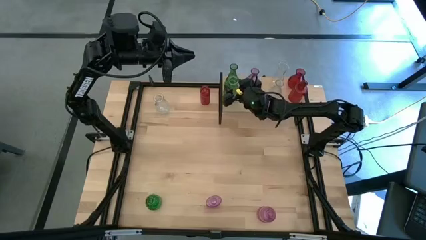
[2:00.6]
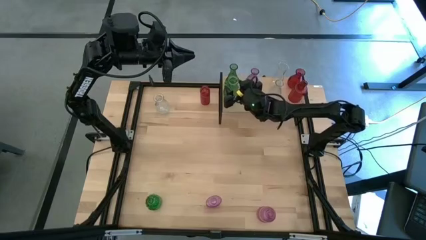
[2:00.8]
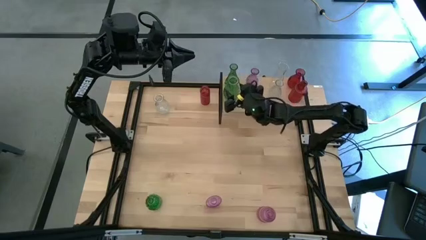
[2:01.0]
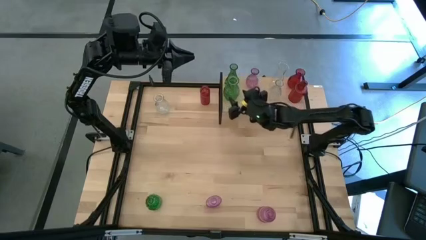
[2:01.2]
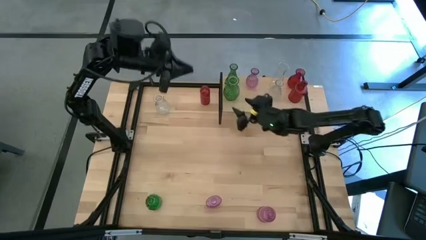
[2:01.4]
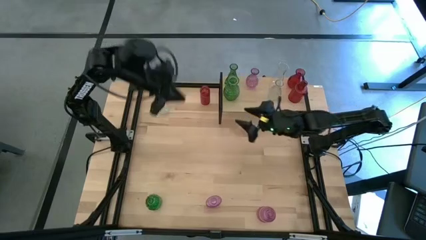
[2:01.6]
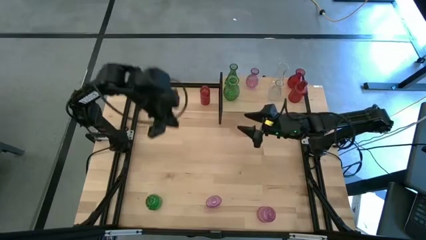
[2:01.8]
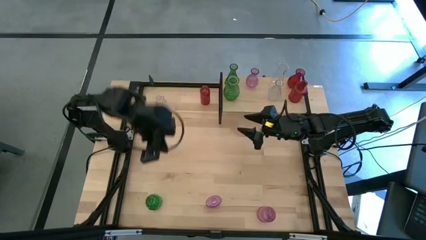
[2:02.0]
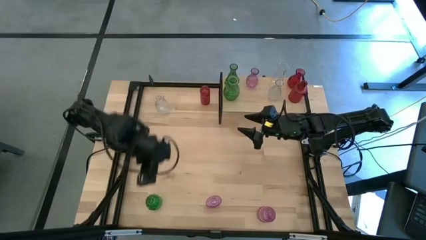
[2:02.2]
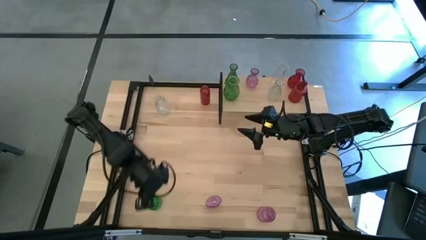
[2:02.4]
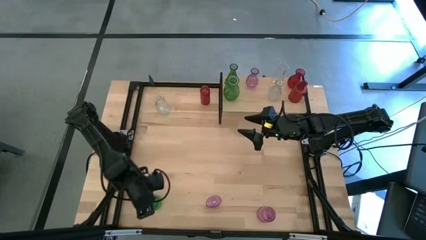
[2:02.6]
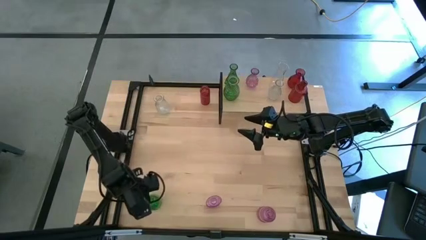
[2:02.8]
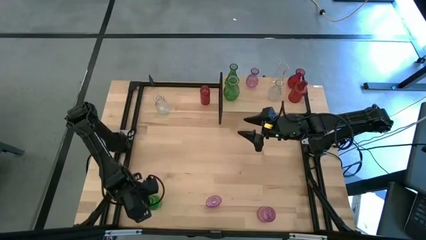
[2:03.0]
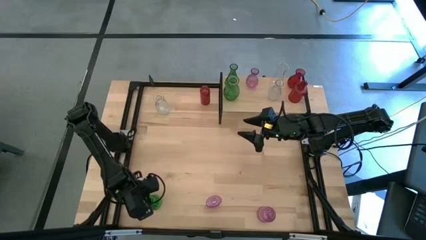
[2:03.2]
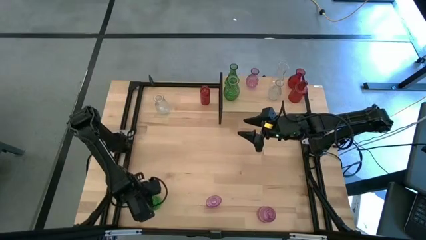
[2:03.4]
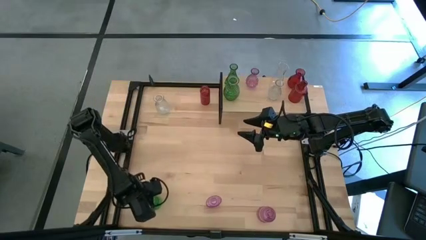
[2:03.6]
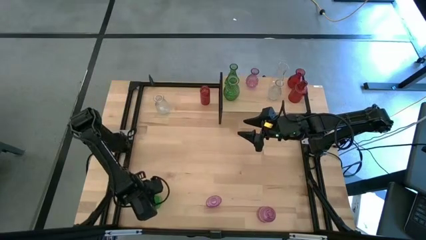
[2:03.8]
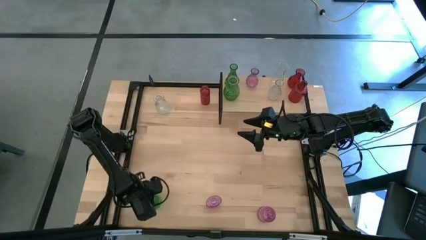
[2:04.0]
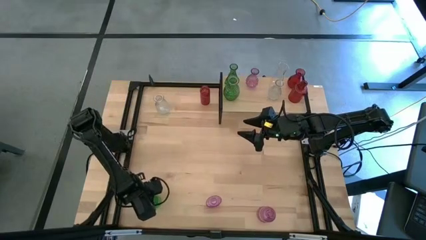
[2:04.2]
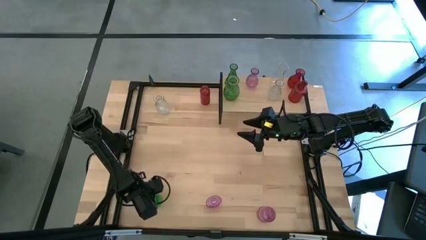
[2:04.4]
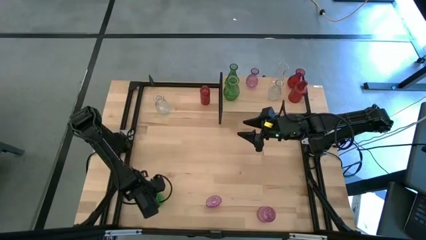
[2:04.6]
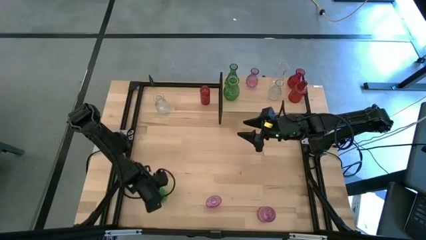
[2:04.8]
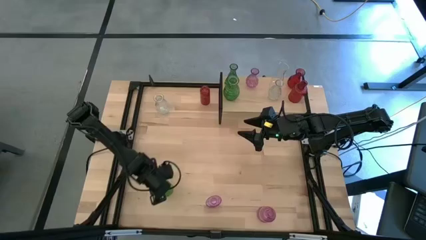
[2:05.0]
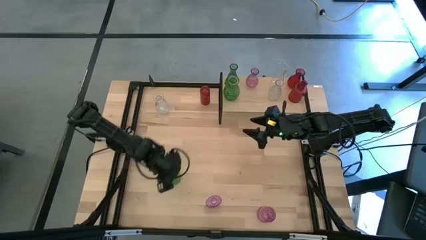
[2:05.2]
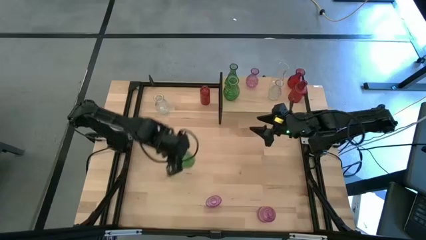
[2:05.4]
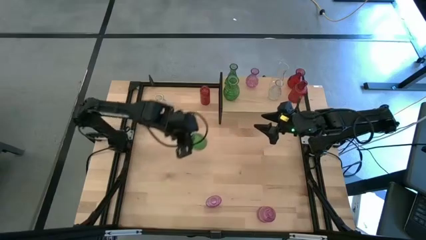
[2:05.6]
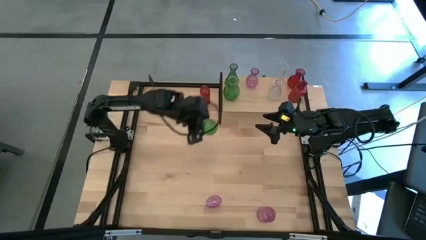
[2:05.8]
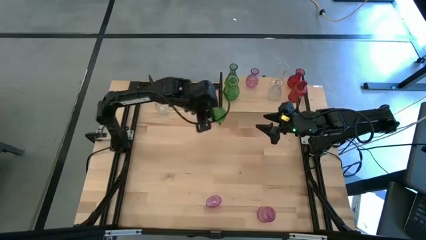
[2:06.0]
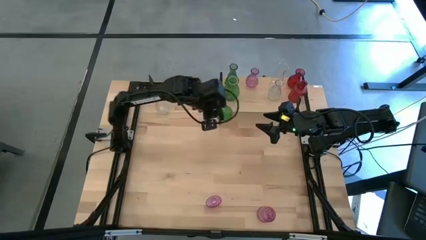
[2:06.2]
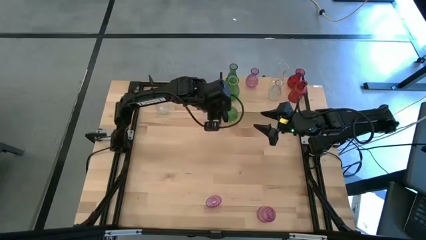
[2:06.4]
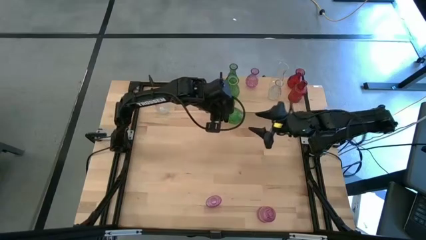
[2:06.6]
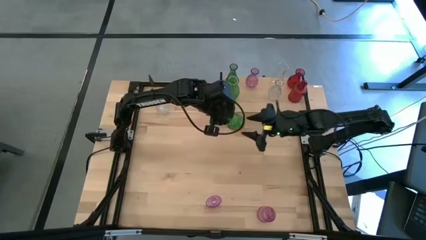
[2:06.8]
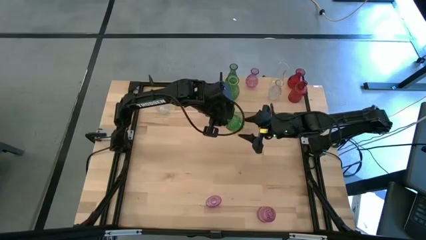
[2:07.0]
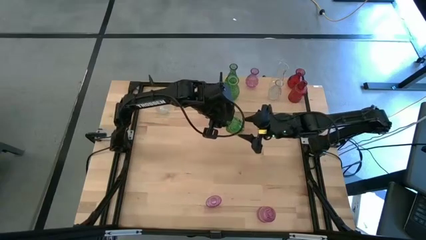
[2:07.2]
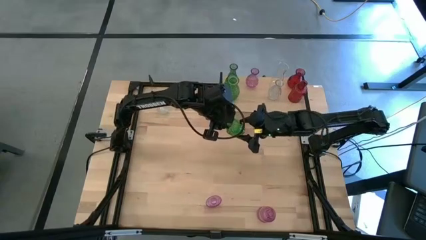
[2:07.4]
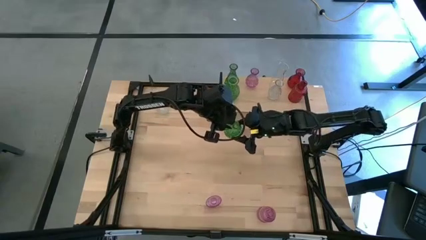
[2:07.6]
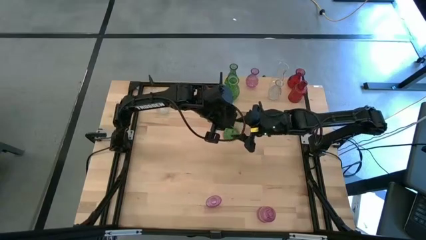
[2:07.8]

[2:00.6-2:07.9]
Task: sort vases onto shelf
Put the green vase on the shelf aligned with the other green vases

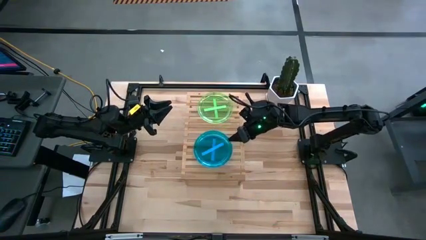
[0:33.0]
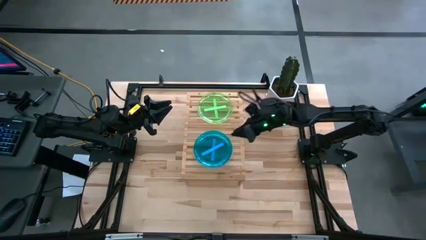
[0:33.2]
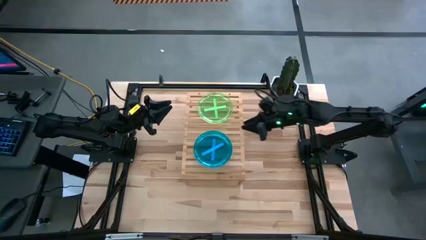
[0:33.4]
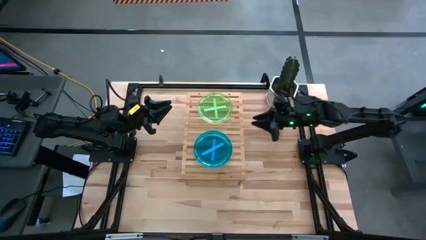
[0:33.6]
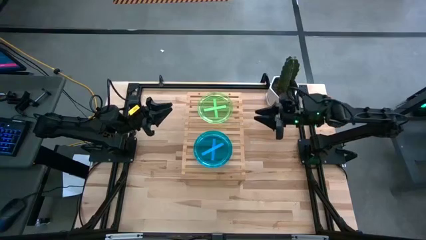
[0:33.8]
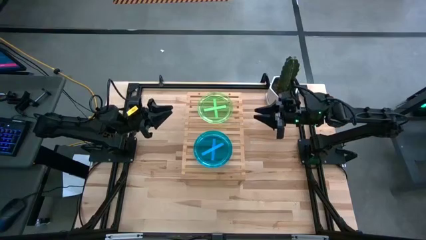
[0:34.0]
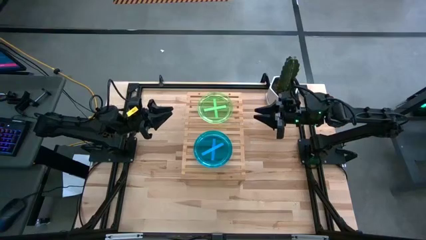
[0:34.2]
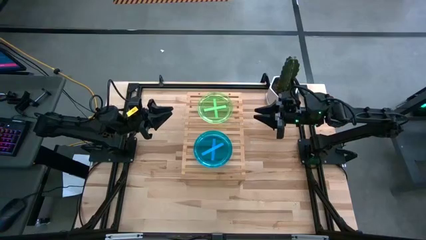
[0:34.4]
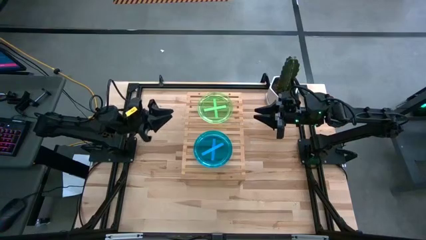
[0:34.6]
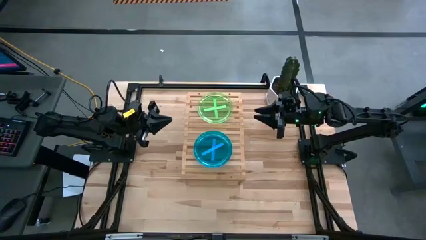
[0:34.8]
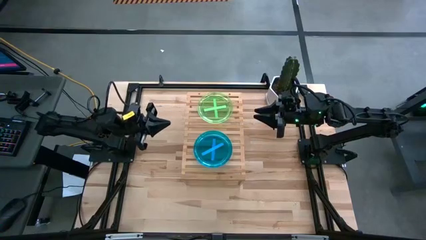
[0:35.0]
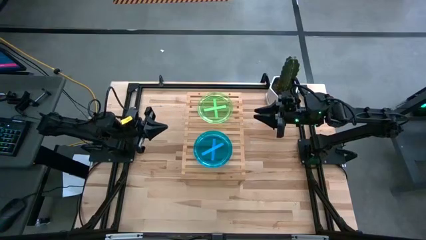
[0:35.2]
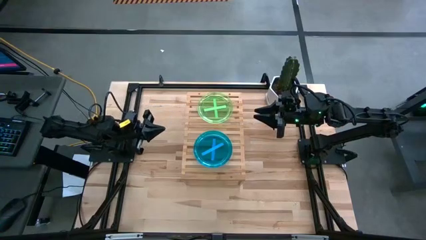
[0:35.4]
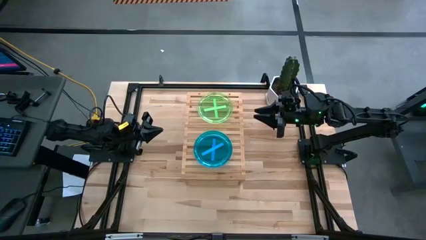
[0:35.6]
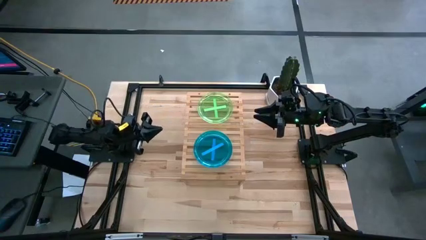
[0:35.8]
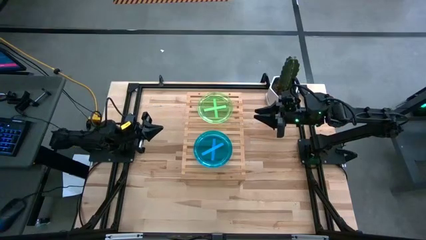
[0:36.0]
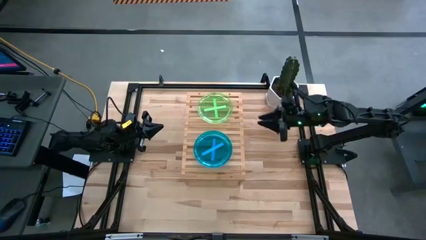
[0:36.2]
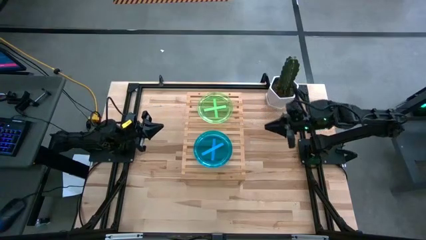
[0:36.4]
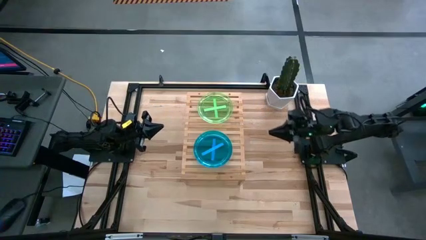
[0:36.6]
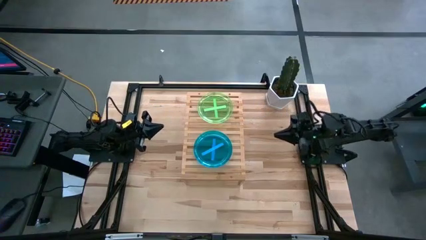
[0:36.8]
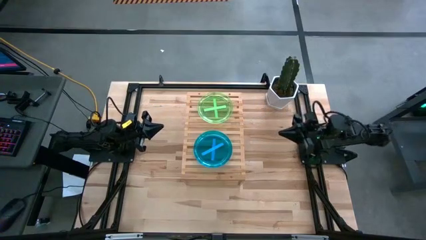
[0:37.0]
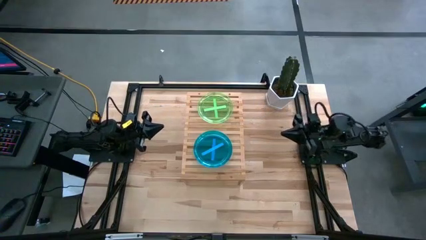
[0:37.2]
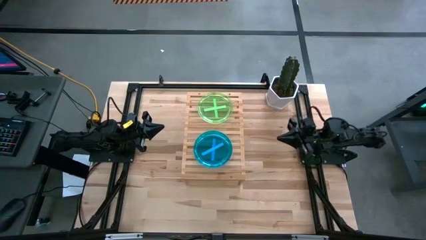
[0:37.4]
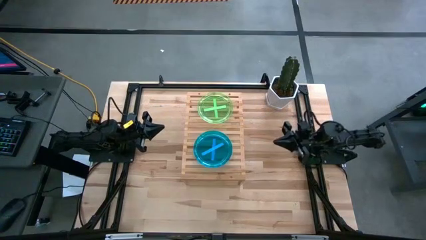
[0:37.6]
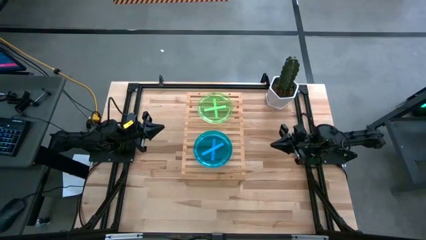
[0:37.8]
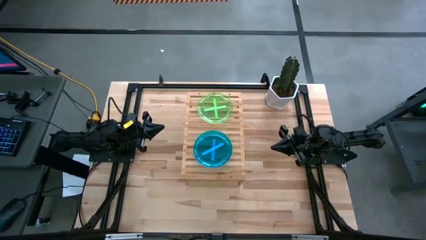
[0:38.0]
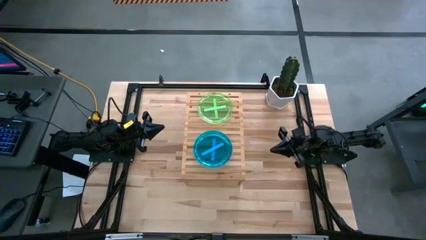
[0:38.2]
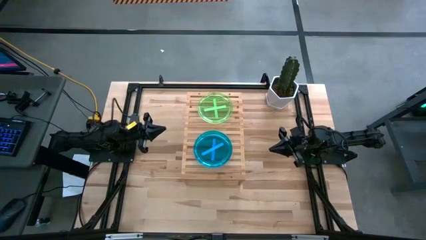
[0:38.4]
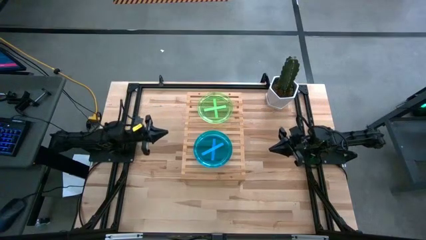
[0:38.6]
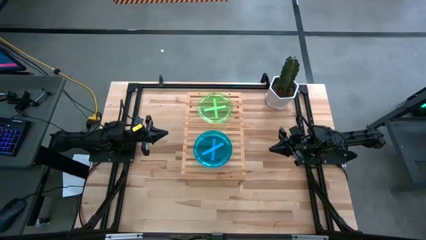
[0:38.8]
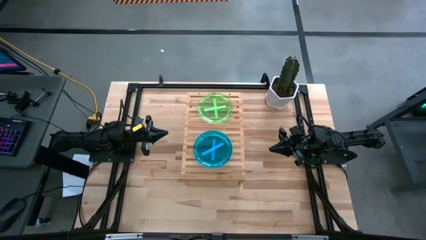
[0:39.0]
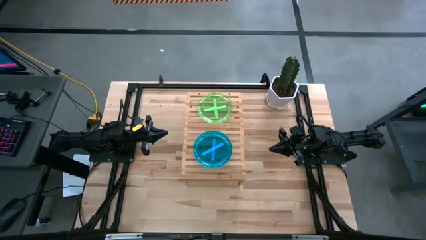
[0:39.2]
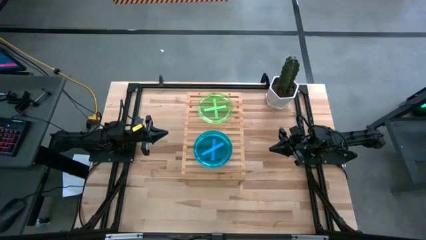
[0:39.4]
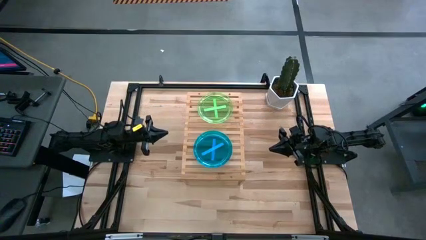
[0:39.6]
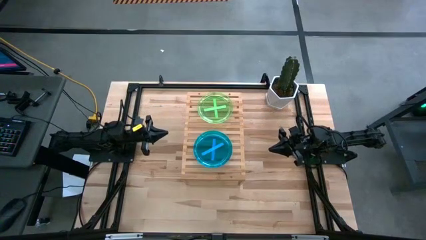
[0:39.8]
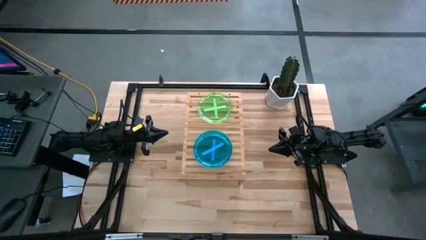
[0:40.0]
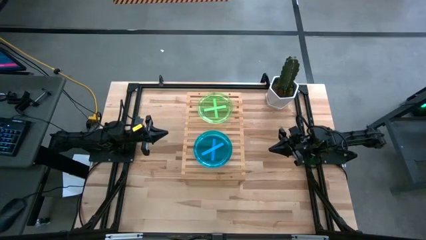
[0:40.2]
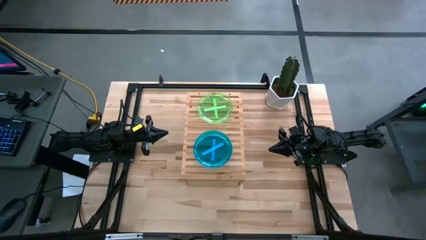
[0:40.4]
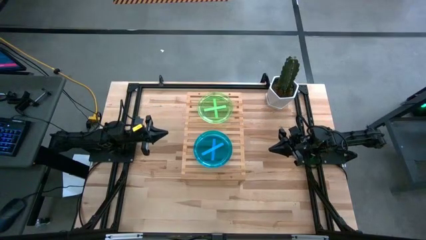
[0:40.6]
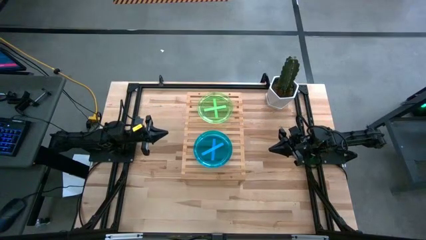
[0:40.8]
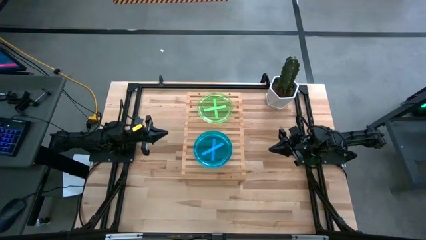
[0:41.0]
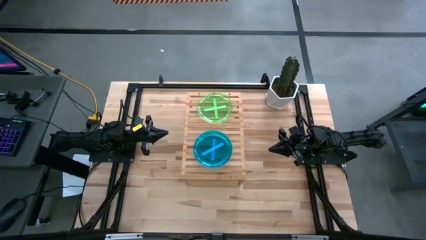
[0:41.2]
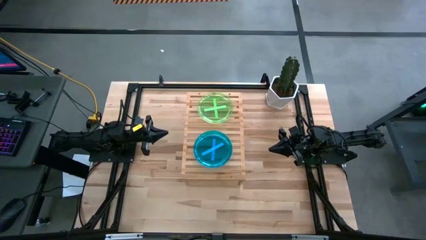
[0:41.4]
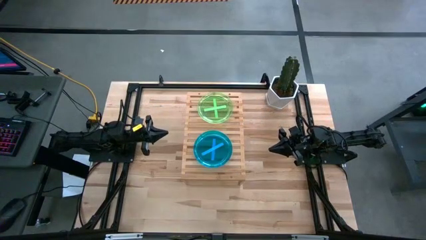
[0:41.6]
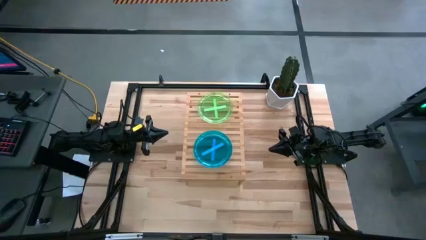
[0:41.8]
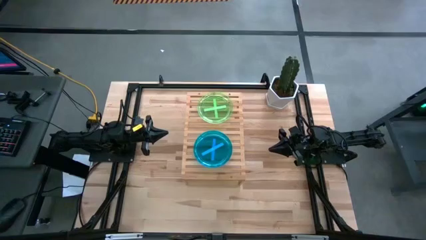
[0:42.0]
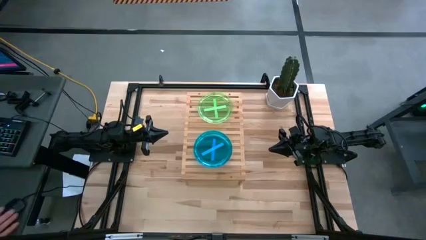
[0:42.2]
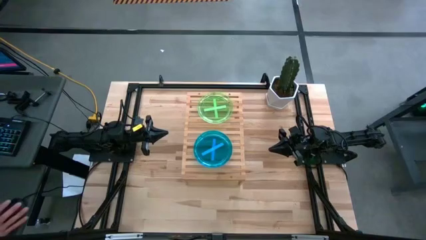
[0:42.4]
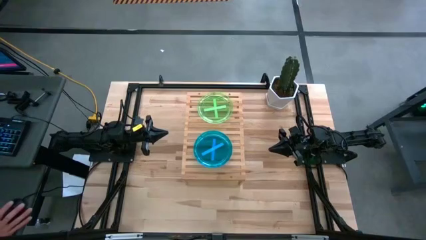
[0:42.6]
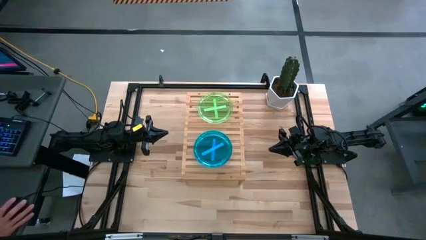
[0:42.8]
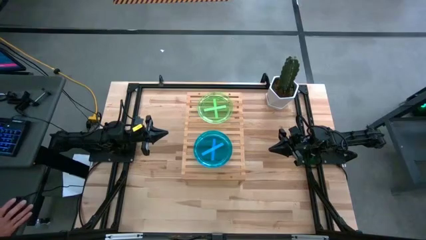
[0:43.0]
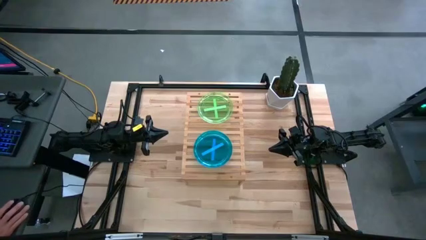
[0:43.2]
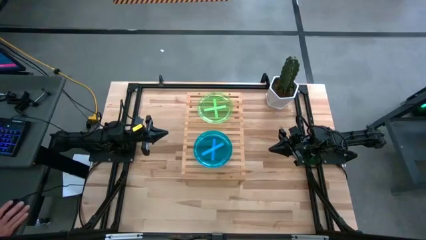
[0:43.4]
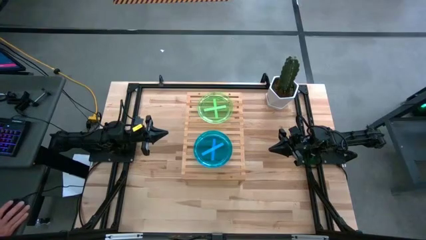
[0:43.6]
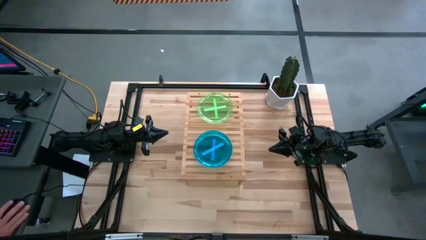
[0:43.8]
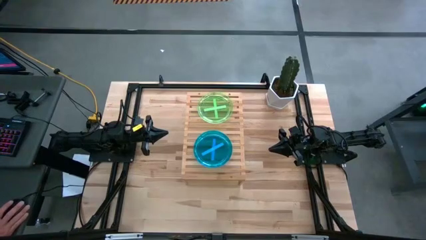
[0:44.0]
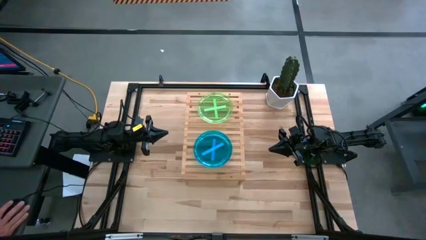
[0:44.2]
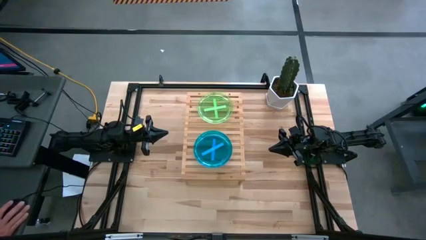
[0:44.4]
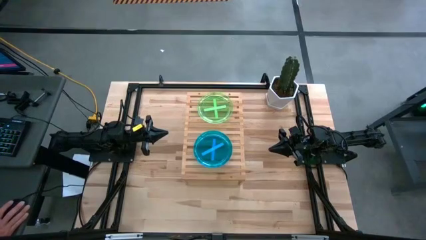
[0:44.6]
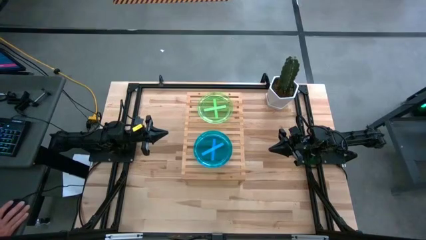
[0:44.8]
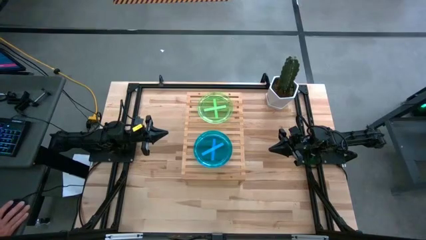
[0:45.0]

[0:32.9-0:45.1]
Task: Place and stack plates onto a shelf
Return to Home Position
